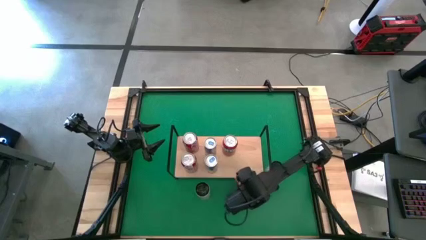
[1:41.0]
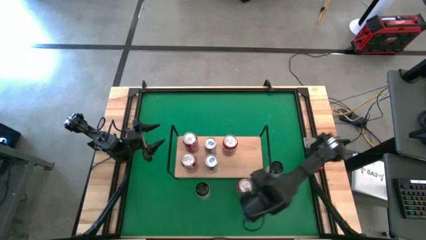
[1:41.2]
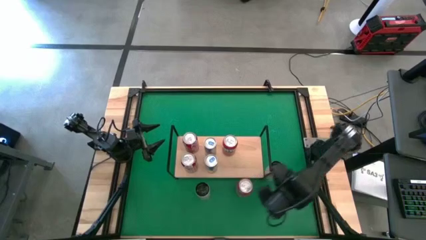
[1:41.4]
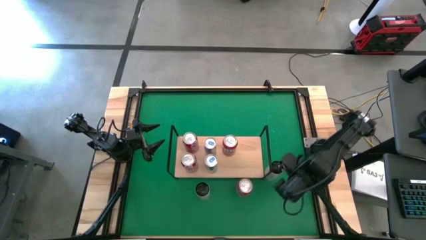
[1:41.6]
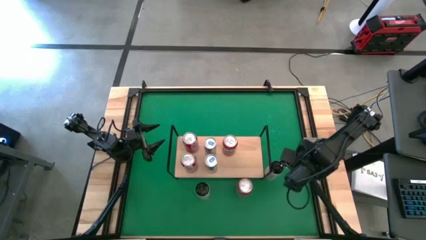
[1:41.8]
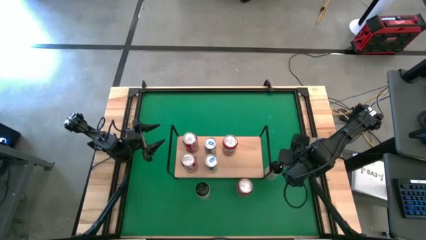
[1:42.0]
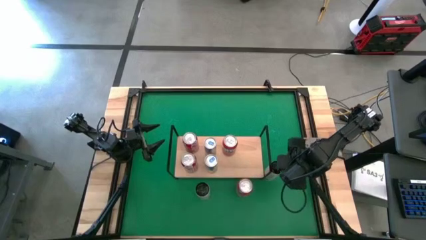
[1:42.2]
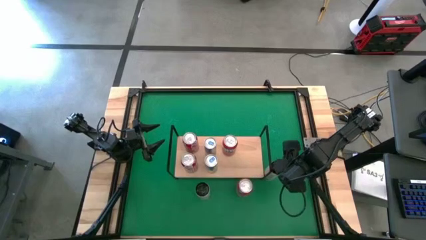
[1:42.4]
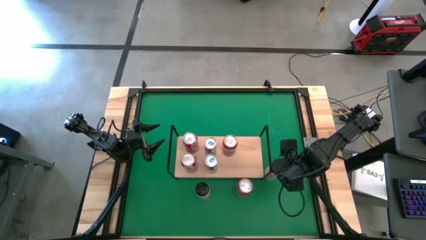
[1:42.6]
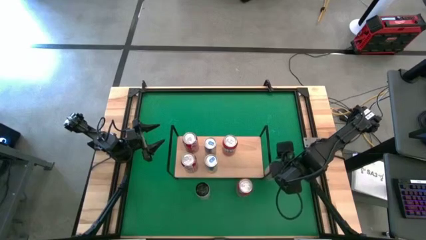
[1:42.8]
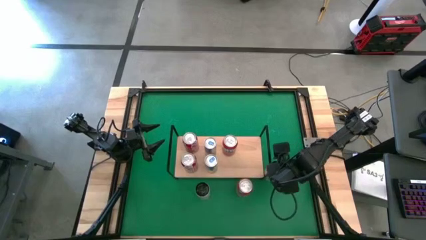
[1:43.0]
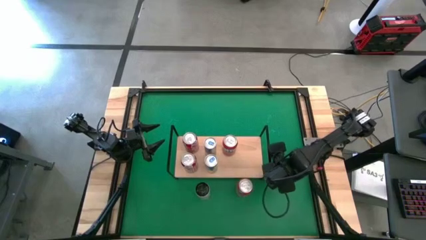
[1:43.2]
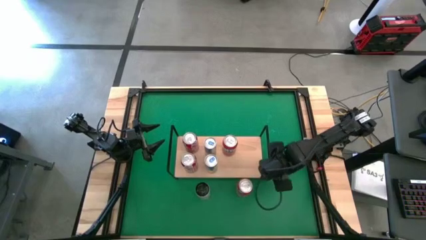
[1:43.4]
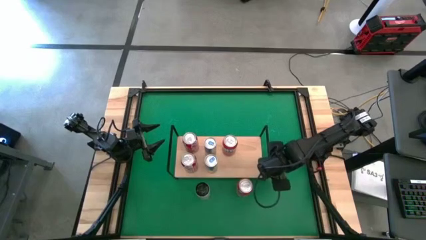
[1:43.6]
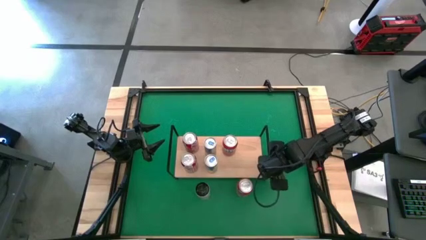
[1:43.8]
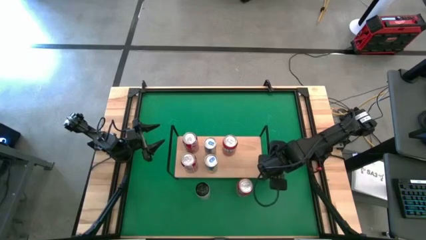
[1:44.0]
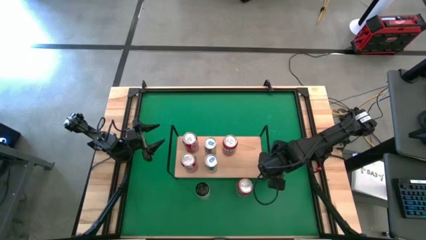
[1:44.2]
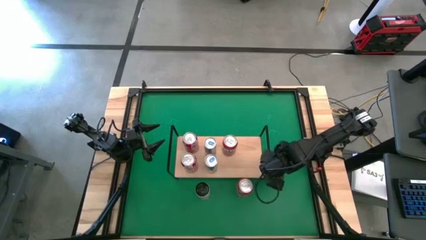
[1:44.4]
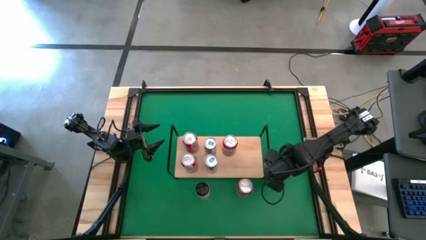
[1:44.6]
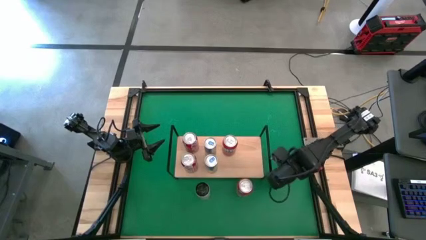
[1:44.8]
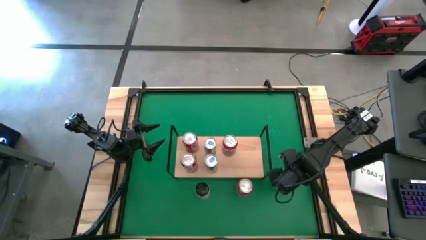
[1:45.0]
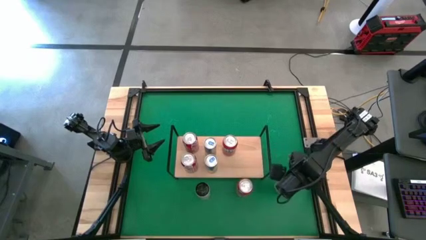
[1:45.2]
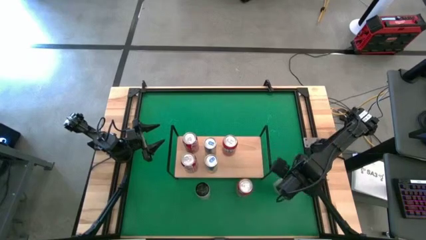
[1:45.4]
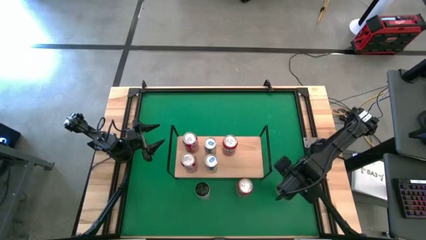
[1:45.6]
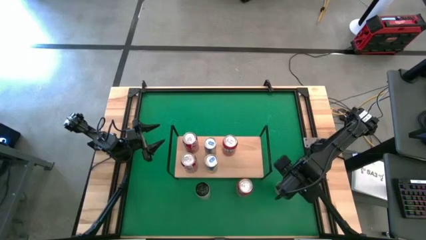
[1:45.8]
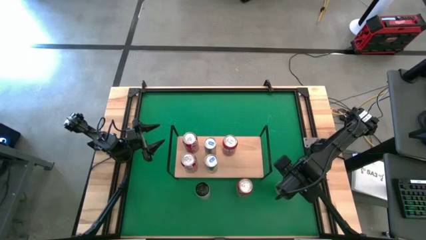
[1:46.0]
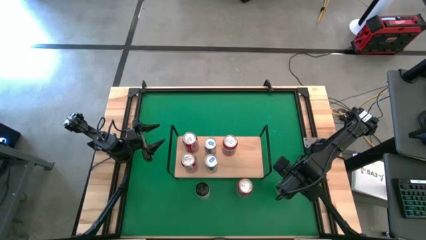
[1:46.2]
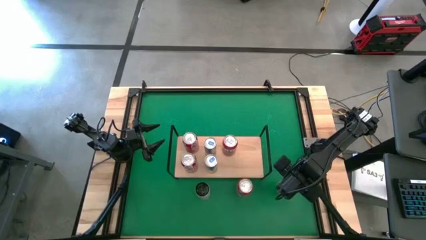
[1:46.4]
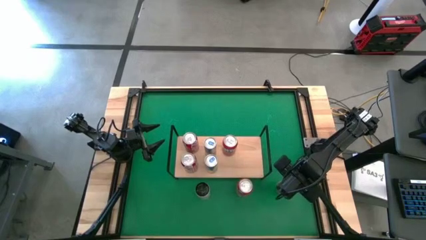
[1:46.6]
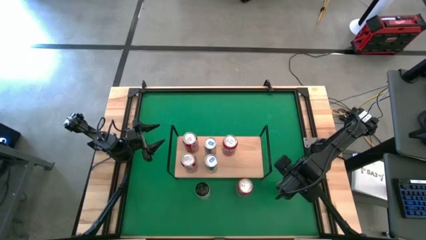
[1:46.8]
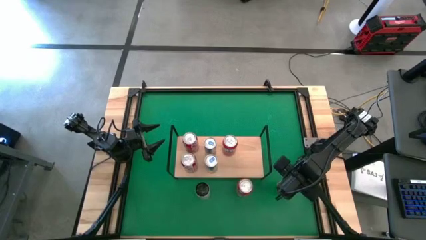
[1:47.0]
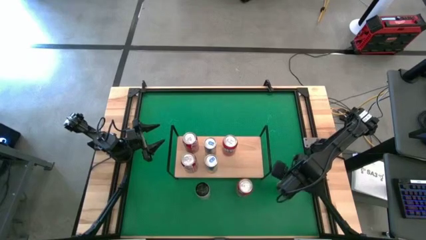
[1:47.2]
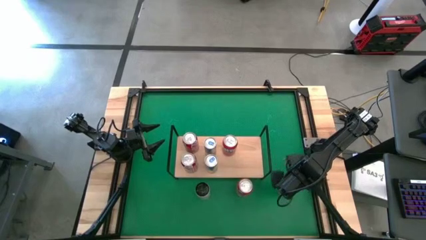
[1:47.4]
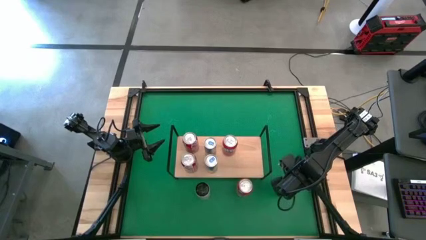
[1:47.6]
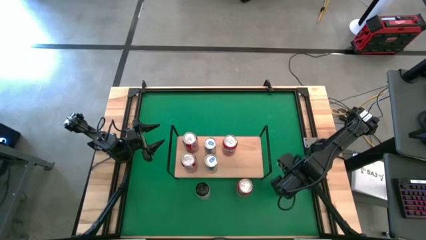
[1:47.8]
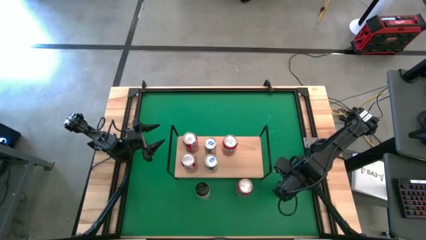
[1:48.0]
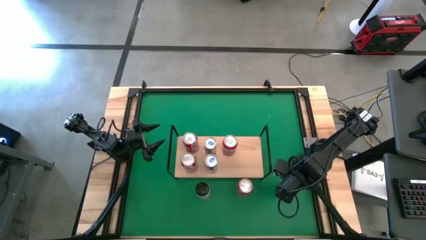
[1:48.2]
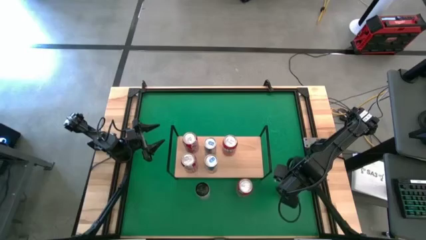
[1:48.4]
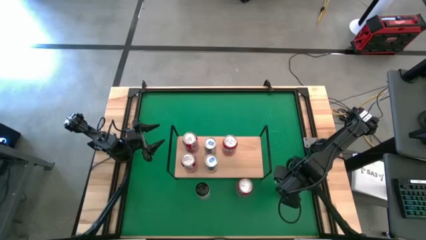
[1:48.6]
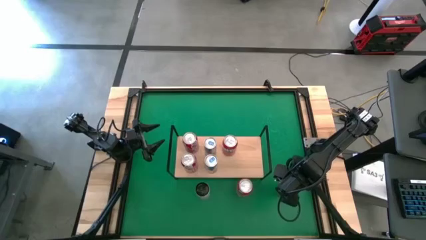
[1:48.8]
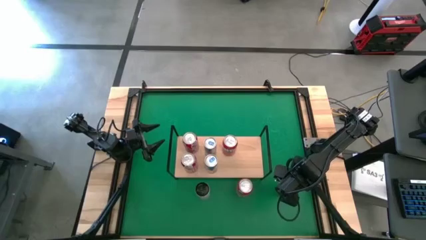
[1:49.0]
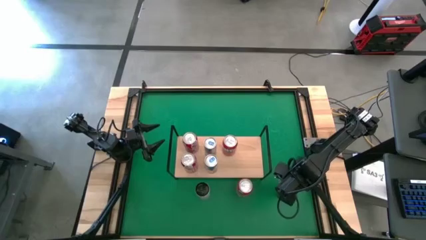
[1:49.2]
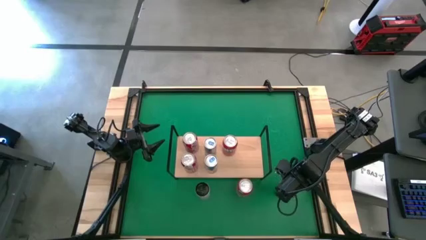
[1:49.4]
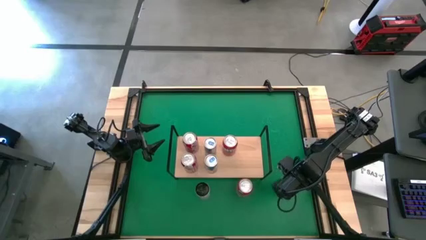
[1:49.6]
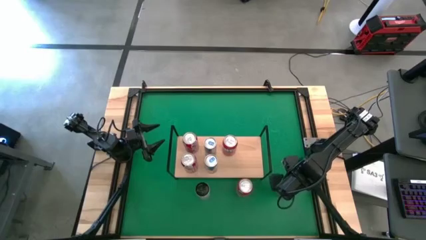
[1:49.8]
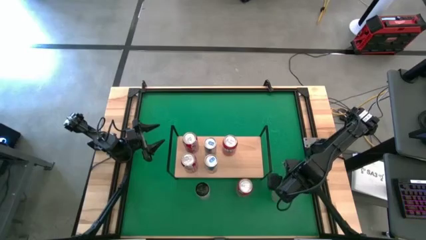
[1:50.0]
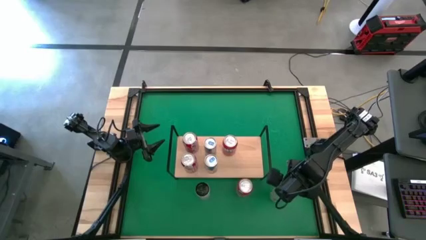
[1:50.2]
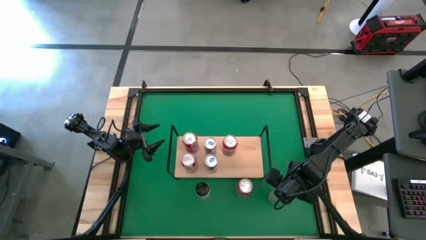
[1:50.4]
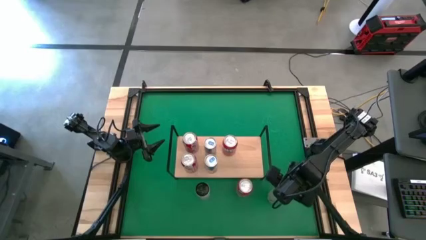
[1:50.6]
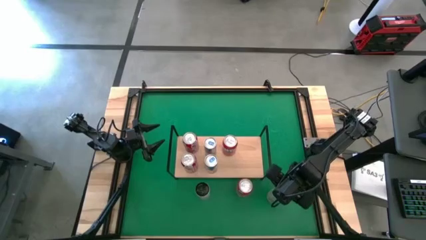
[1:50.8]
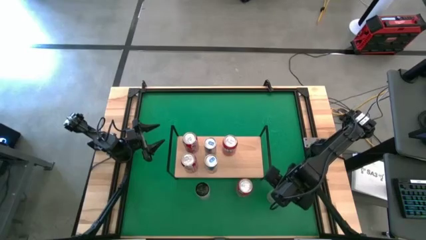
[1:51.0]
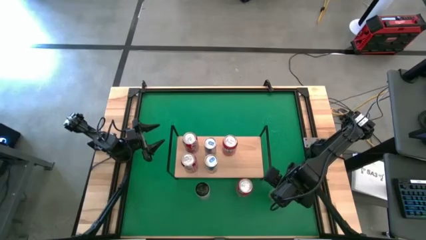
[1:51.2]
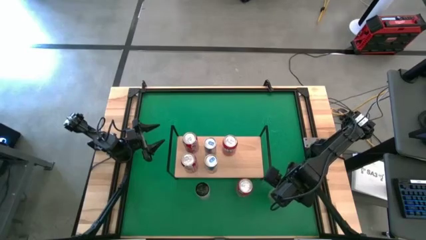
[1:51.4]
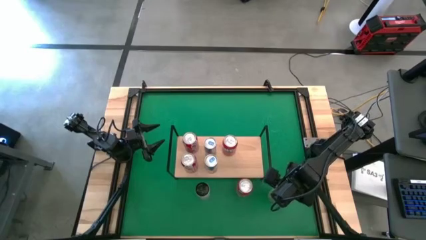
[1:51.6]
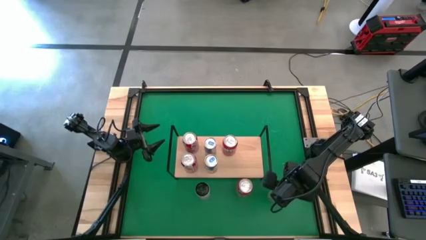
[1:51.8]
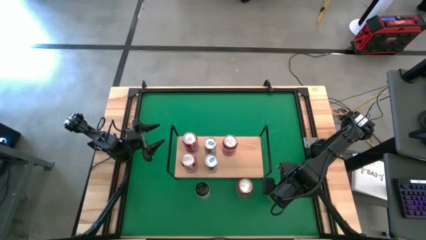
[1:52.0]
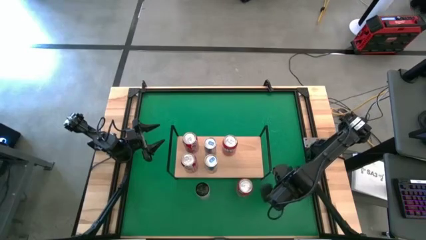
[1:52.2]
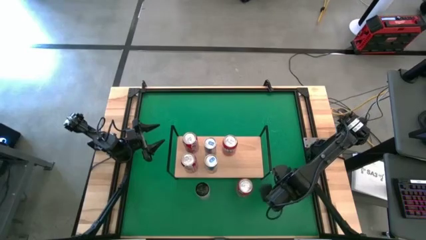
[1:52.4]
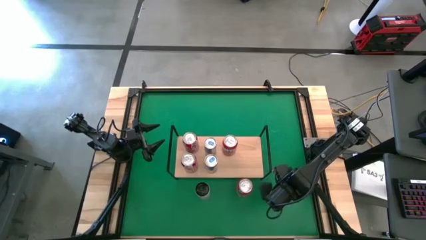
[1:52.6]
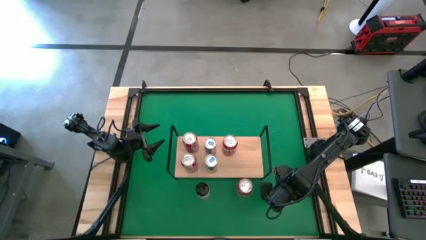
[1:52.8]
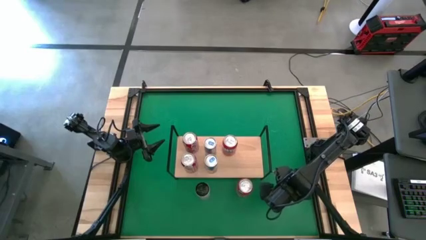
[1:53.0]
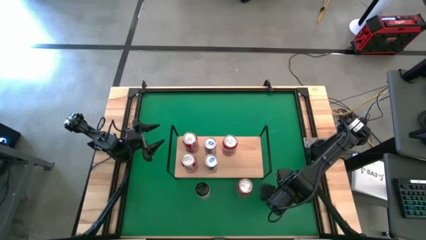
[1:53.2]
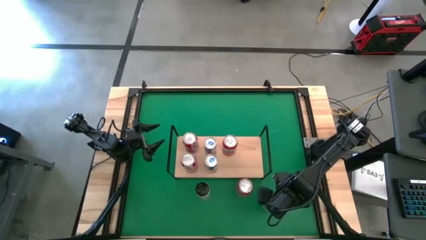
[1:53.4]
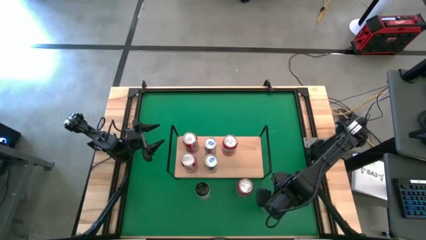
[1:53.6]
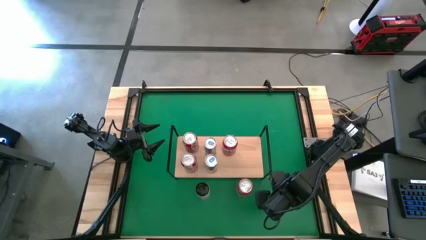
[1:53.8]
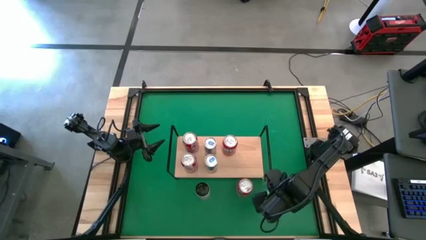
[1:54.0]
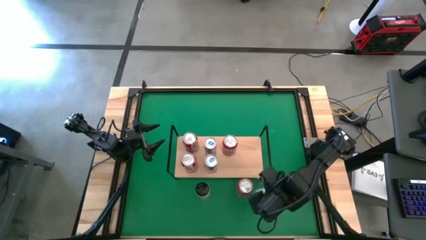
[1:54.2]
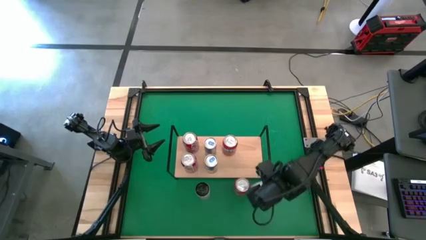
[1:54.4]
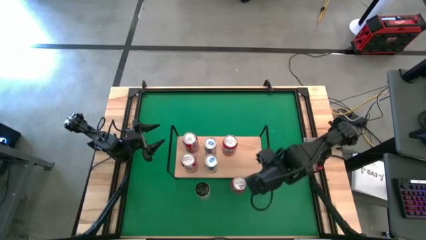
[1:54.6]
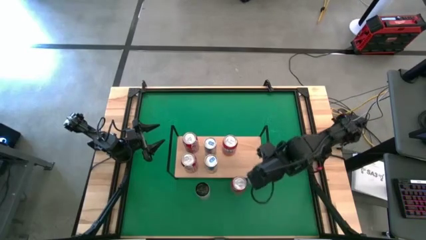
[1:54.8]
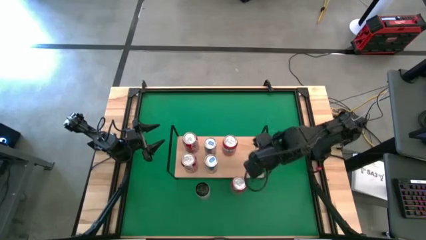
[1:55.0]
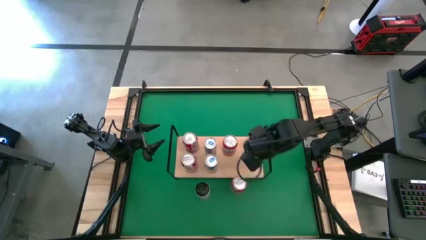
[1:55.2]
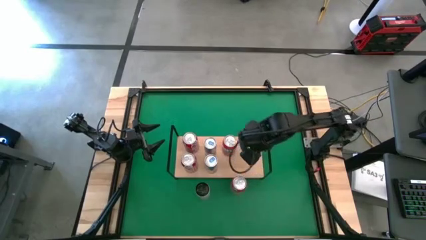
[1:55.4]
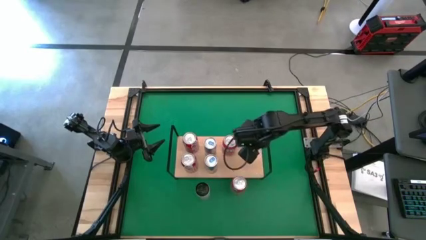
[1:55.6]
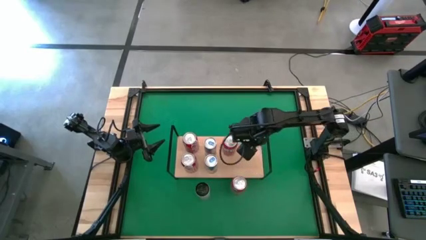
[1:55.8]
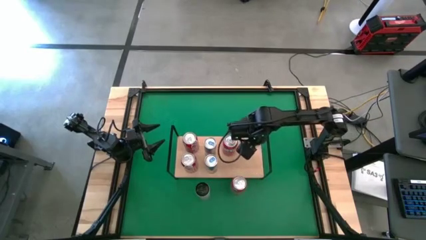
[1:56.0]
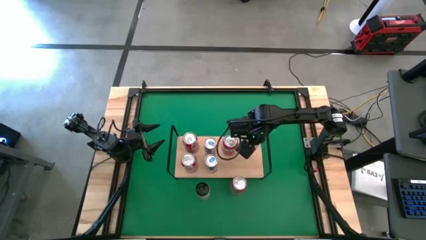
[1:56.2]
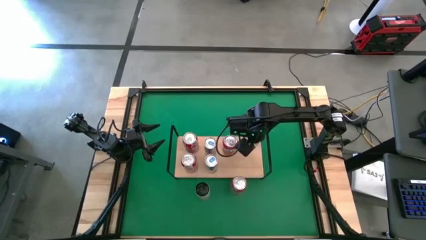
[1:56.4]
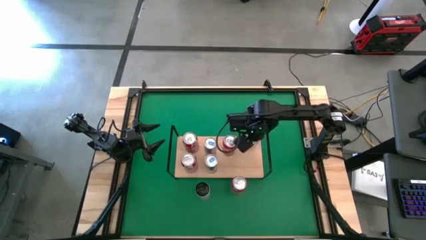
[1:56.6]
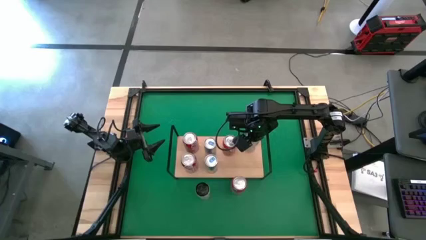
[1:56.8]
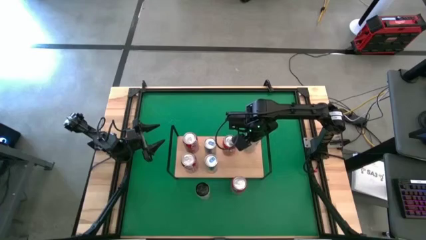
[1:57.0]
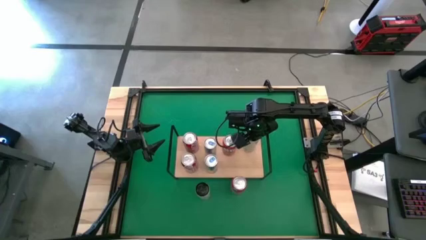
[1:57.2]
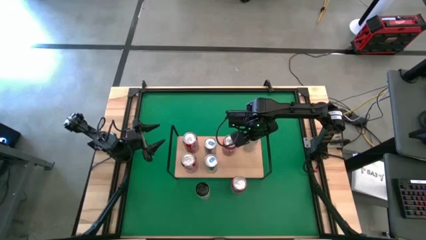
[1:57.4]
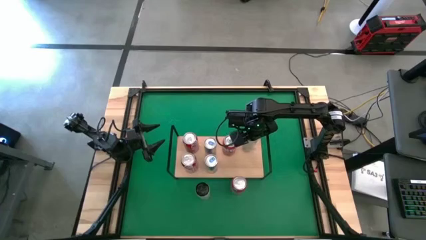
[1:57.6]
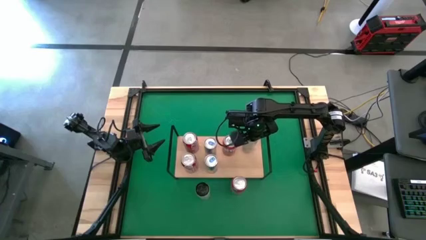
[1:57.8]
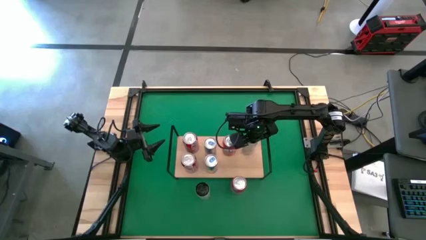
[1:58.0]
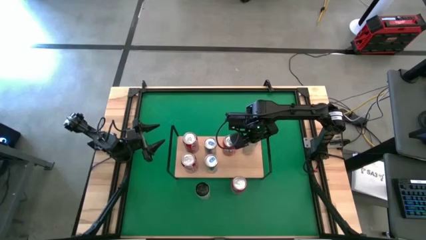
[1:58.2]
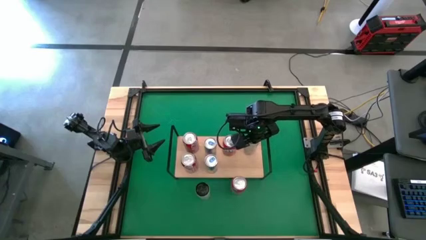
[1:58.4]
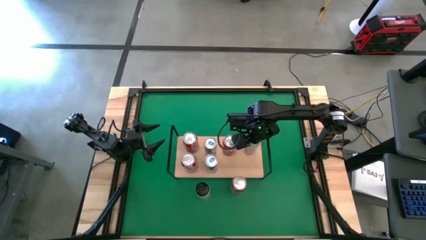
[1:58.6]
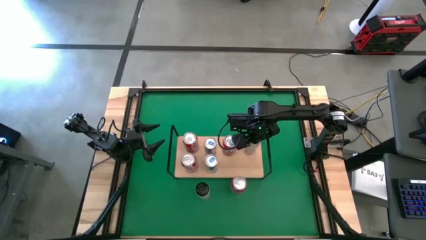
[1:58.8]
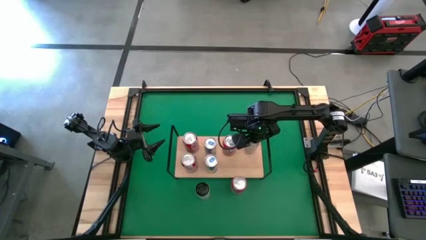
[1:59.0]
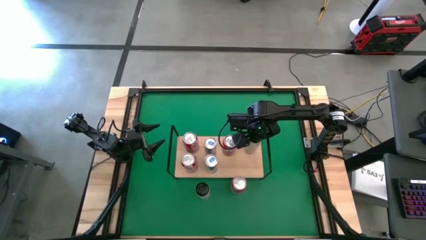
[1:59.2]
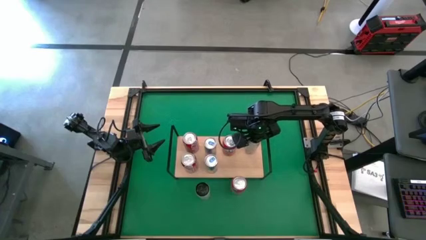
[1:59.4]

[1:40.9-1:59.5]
Task: Place canned beverage on shelf
Put the right white soda can on the shelf
